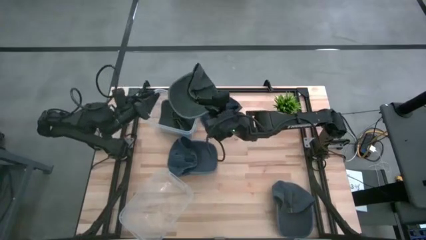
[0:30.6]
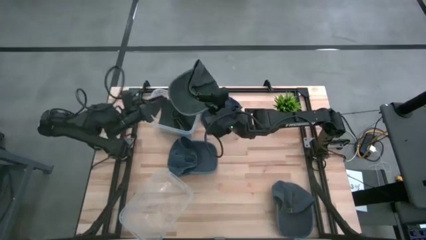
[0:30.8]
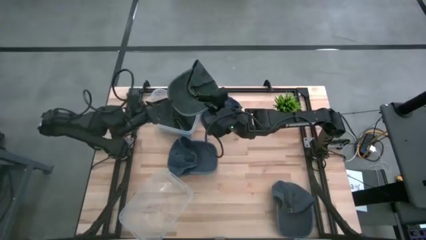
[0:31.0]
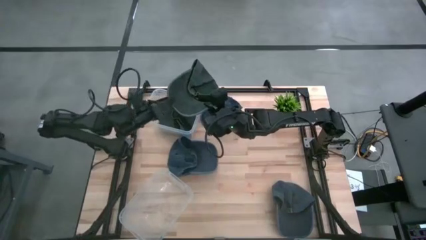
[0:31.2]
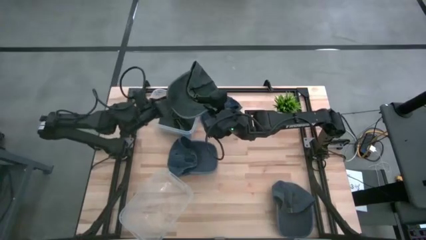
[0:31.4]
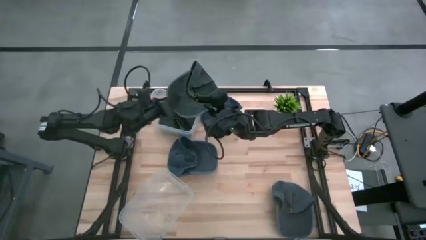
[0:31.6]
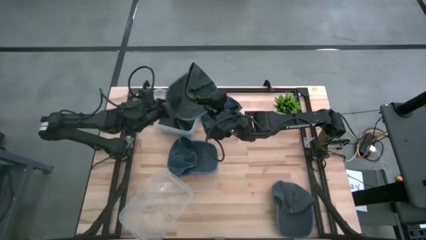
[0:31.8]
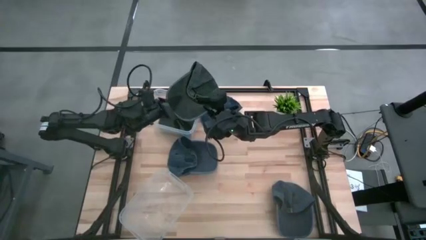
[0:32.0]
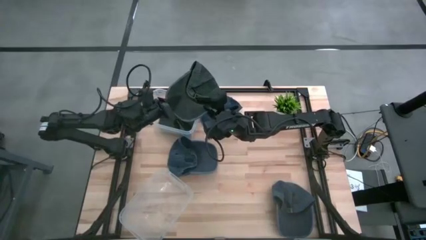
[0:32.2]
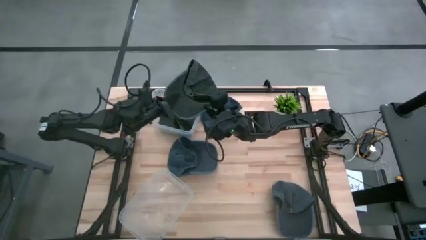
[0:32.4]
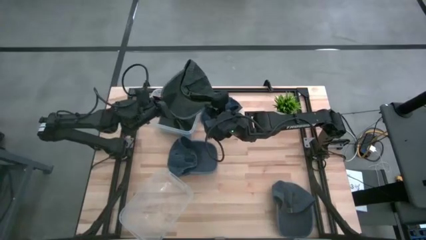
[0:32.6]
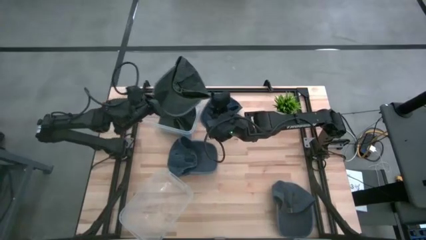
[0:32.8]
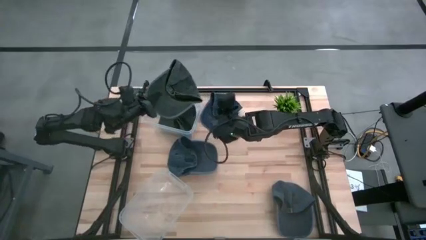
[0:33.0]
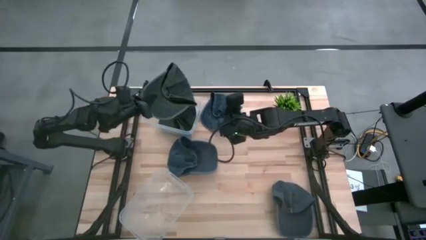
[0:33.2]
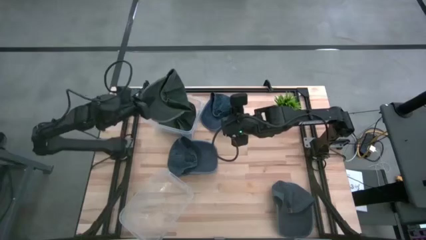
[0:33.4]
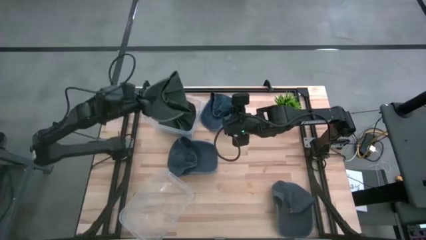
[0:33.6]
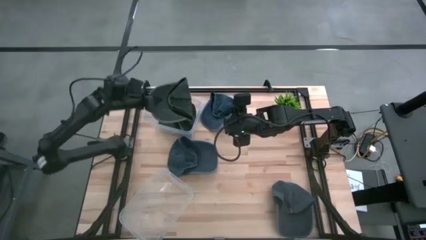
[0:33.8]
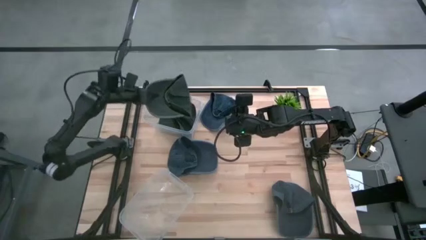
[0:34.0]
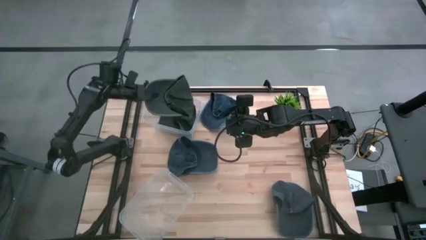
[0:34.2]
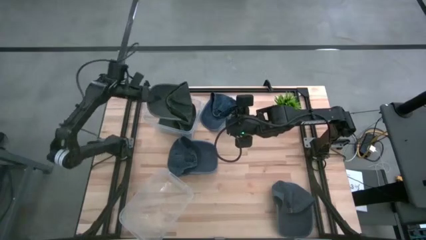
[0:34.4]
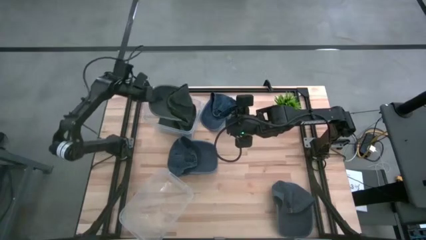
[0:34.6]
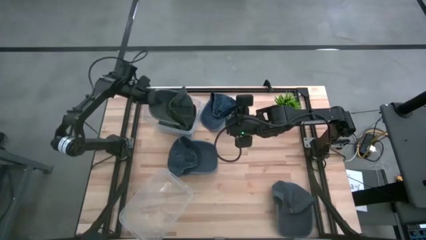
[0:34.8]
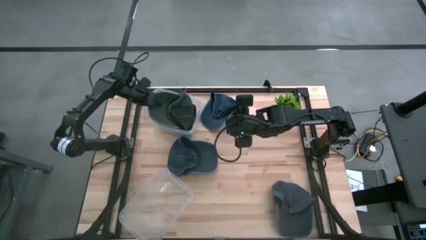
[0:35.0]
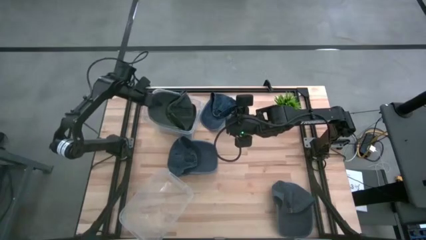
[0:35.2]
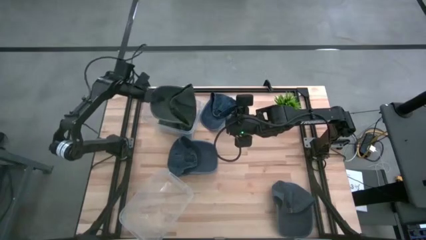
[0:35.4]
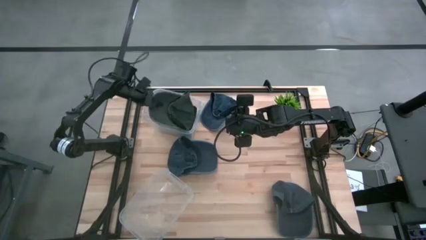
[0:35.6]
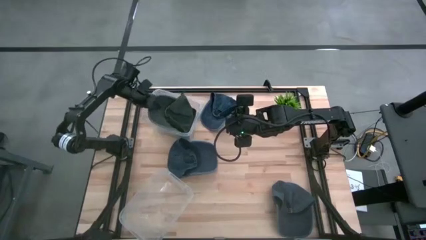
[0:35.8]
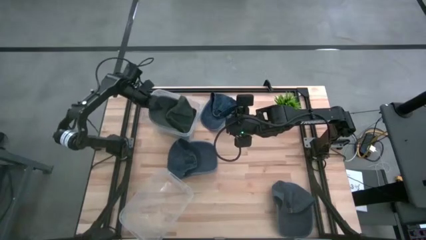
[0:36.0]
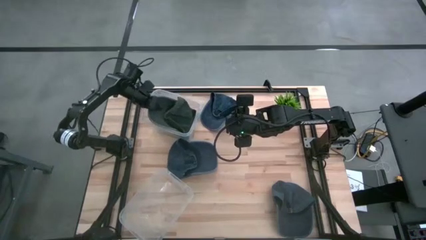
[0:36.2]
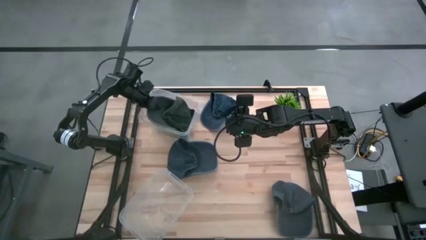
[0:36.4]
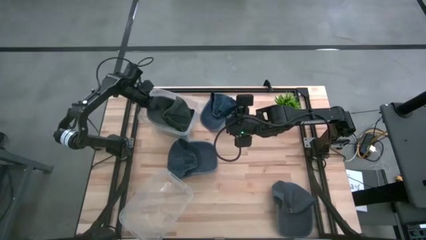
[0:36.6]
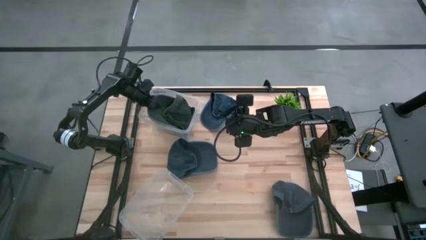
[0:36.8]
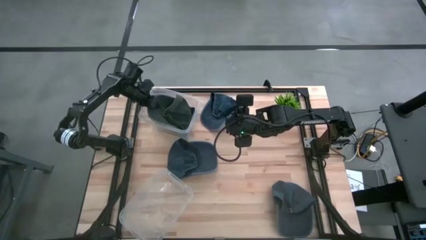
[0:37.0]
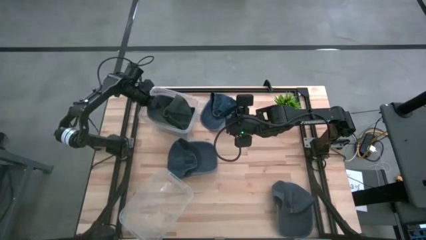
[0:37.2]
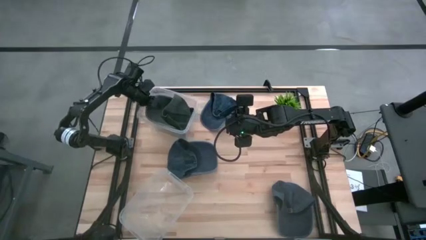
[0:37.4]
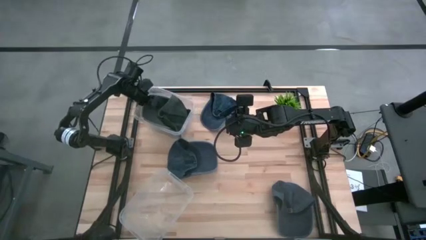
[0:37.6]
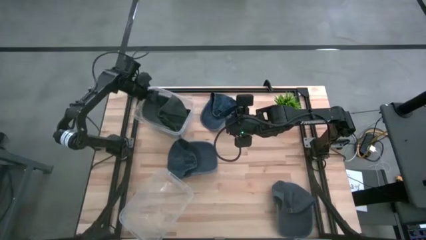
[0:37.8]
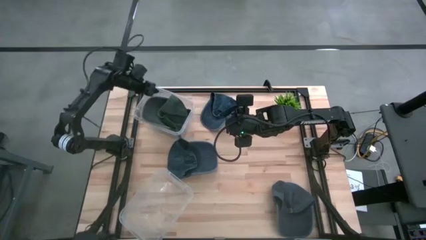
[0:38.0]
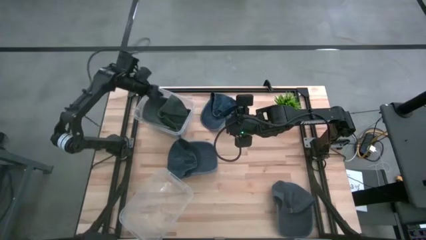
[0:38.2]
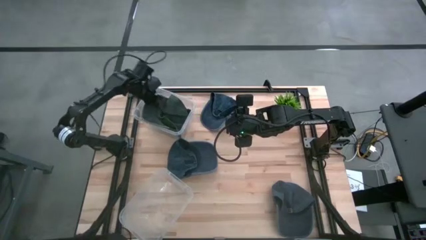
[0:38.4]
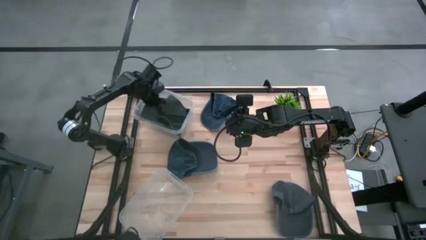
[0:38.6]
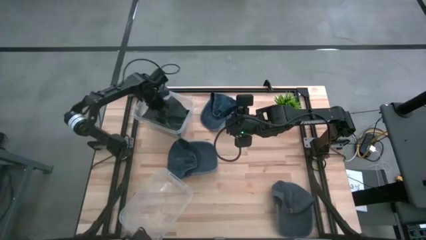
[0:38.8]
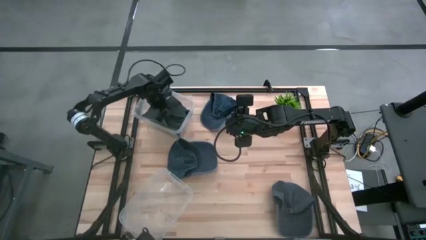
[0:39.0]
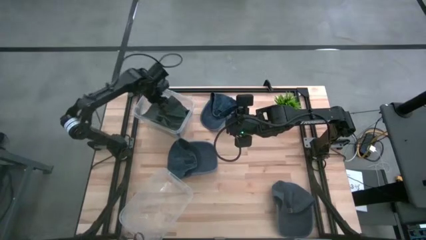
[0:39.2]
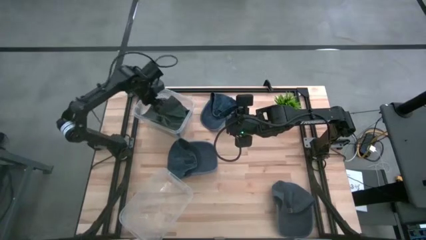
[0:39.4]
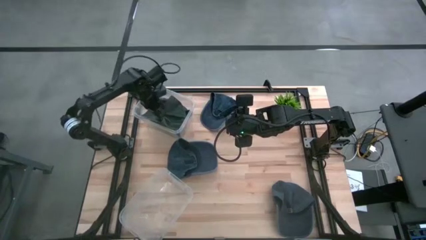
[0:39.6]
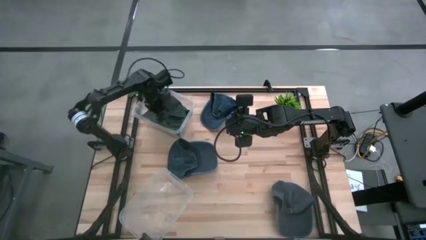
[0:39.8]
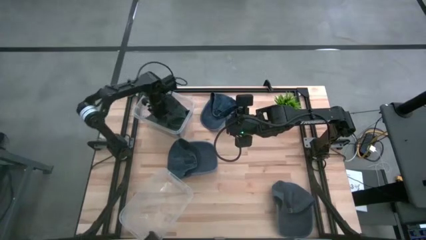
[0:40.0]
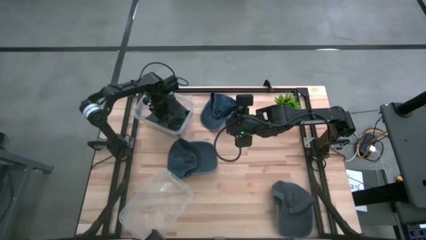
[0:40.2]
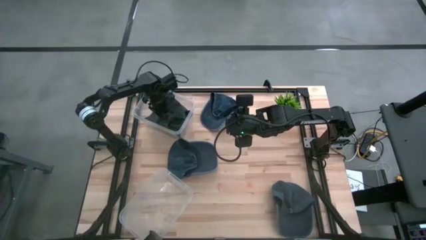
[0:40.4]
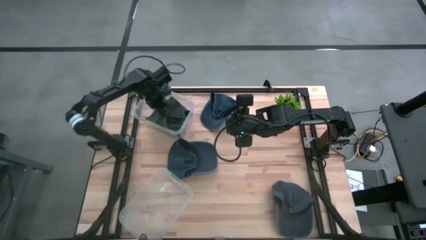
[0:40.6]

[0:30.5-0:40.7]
Task: Pick & Place hat
Put the gray cap into the top transparent bin
